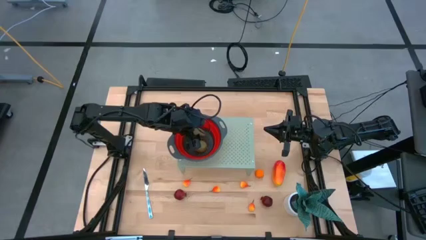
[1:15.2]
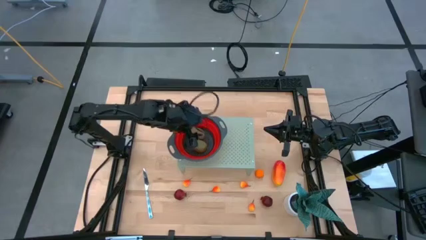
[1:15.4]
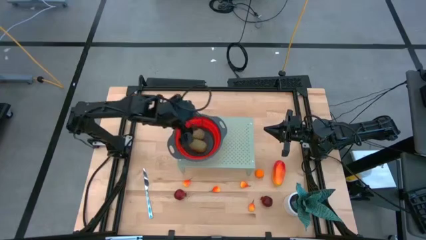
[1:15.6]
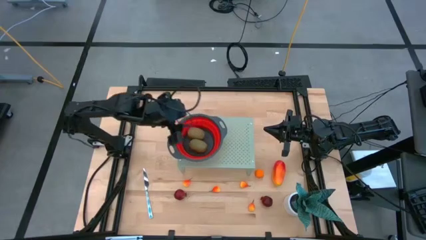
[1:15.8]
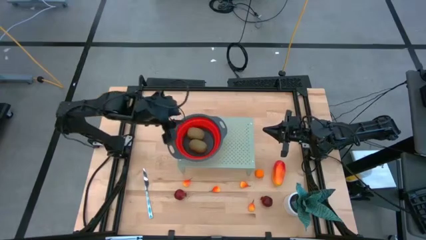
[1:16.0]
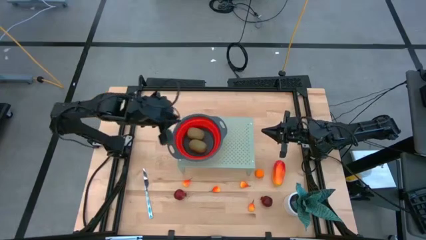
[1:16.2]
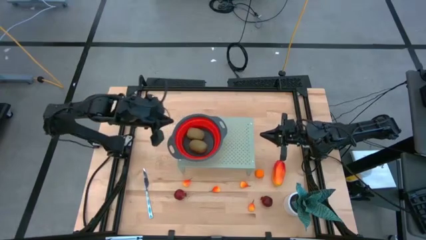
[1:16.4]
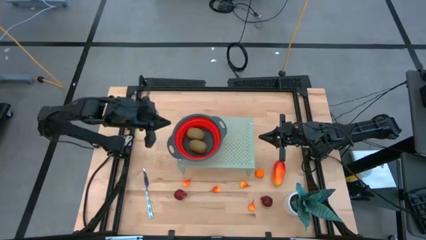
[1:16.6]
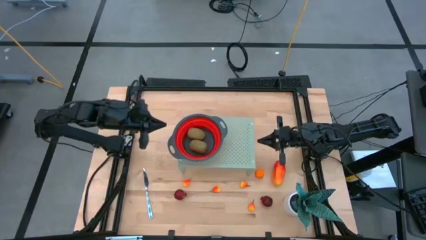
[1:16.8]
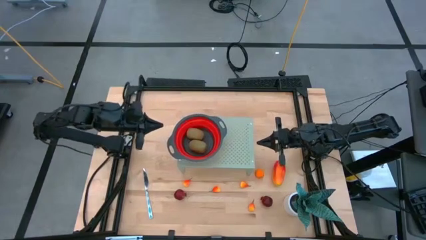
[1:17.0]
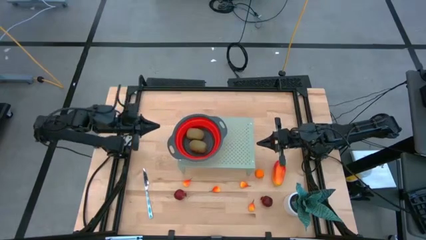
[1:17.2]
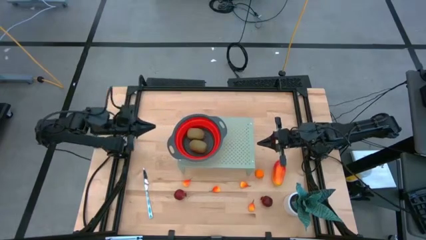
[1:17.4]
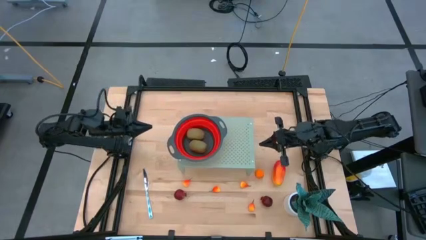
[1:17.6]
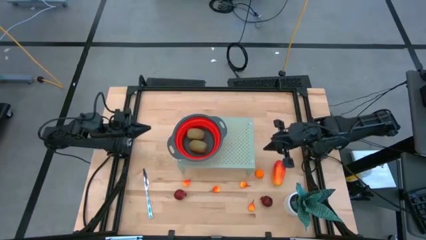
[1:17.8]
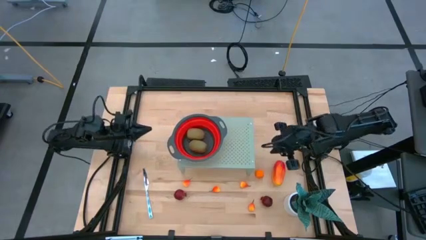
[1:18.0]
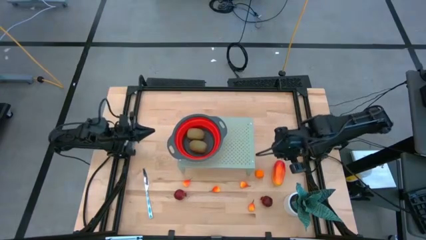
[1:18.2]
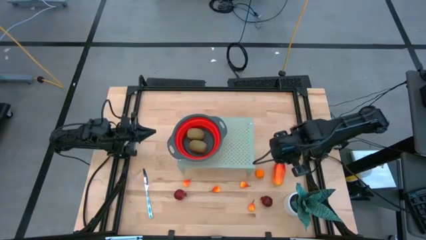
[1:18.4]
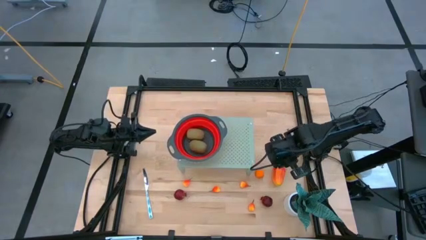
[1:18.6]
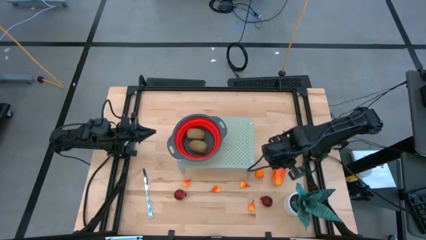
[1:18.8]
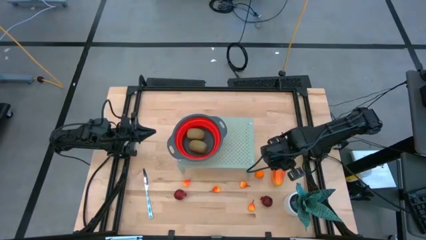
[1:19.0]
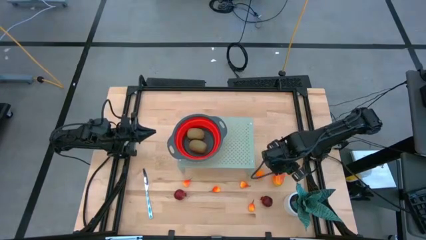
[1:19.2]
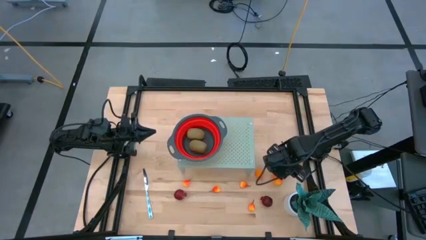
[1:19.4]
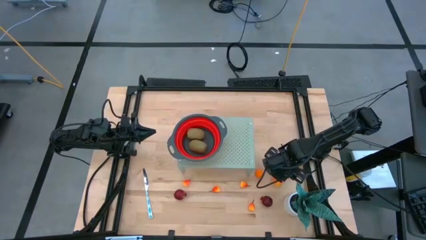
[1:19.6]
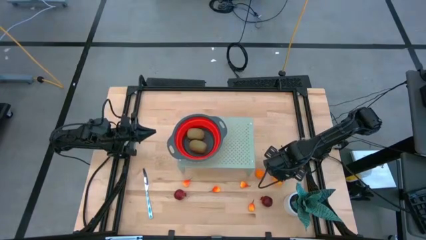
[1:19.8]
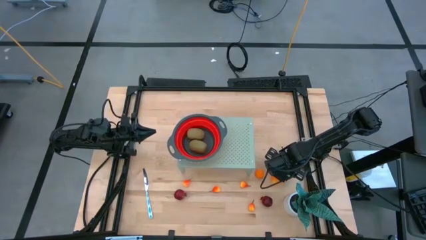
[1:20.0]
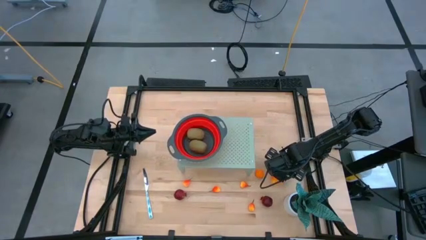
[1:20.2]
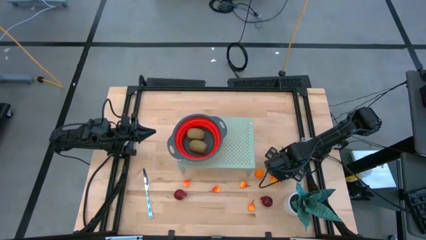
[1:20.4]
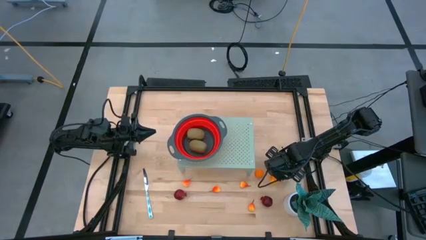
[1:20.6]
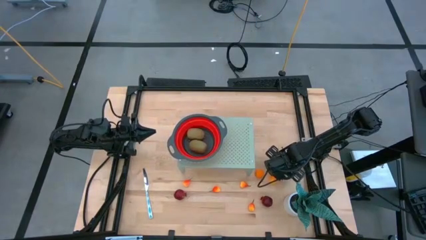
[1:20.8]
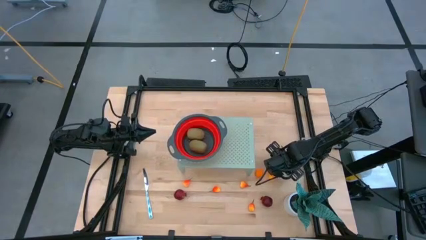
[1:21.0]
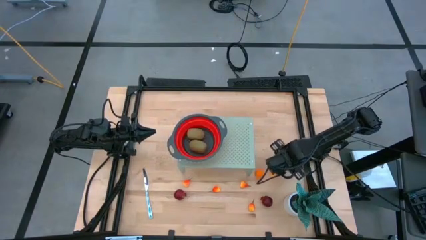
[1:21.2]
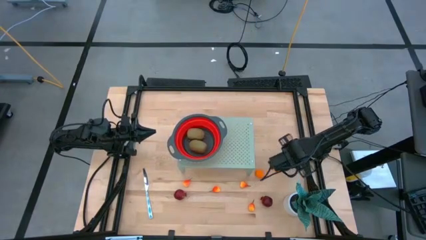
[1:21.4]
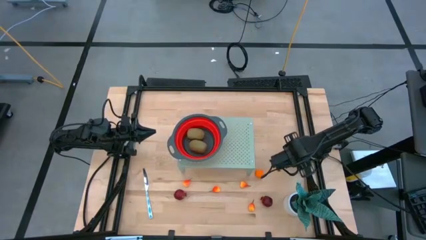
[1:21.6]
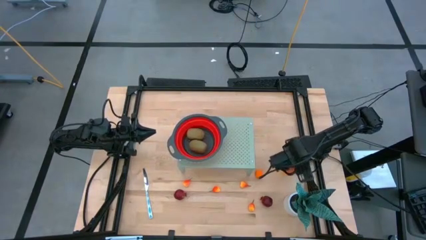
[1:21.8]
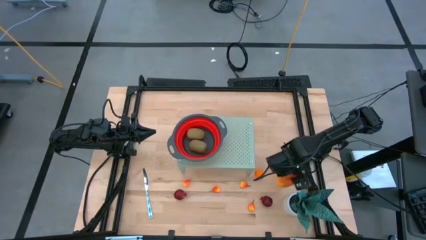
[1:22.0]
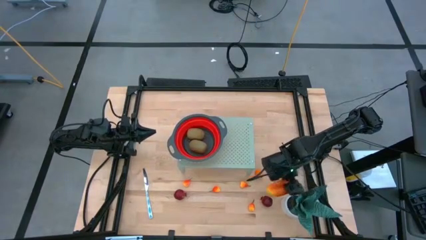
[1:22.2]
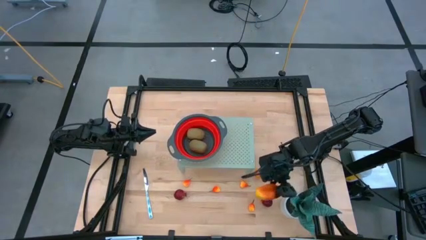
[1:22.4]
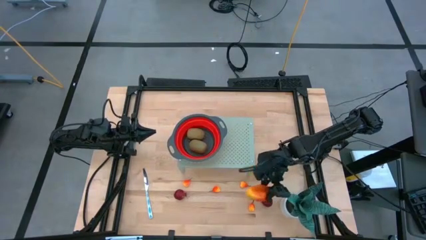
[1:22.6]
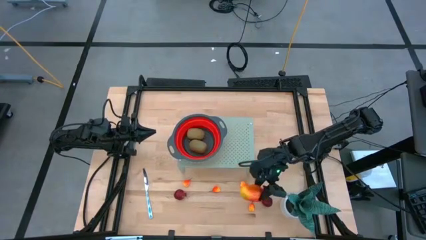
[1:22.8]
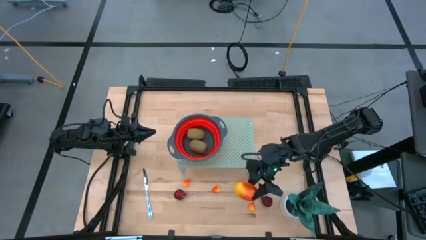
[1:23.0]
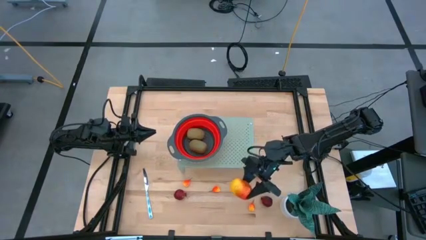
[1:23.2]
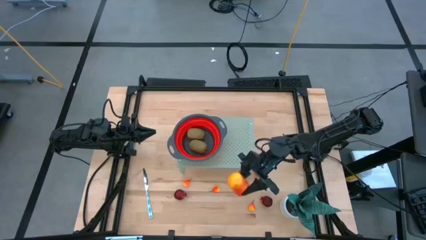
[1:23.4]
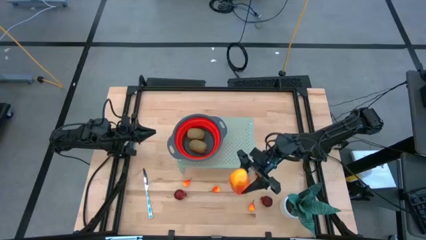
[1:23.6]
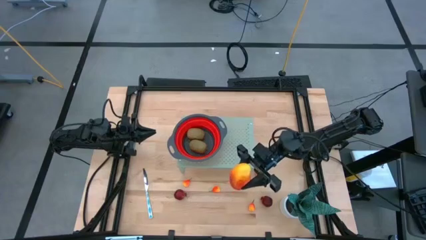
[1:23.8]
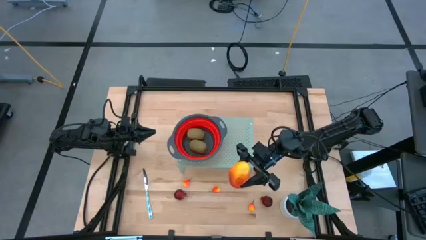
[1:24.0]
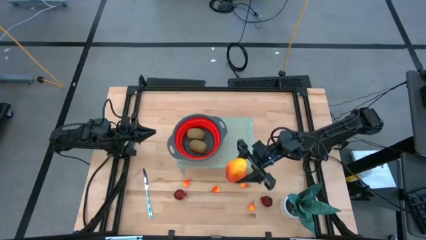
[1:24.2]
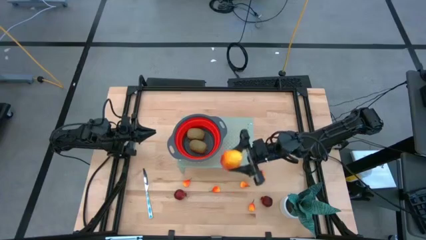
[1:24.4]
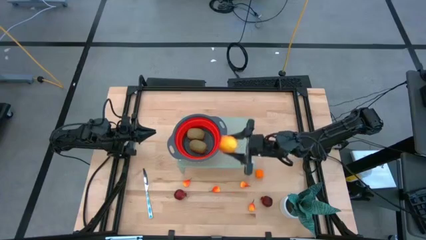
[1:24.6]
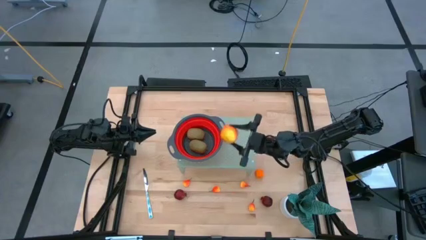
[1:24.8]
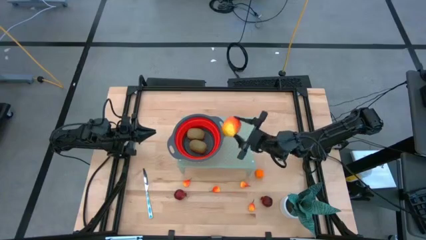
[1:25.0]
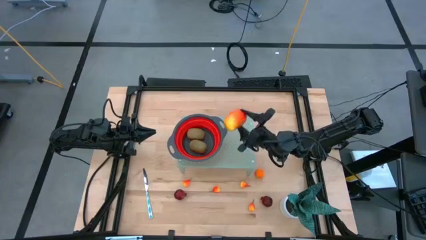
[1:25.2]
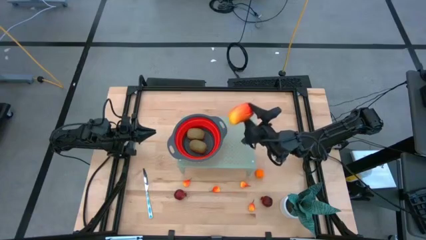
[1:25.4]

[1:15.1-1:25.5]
Task: Pick & Place Fruit
Put the mango fruit into the strainer

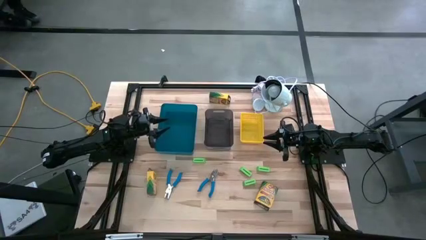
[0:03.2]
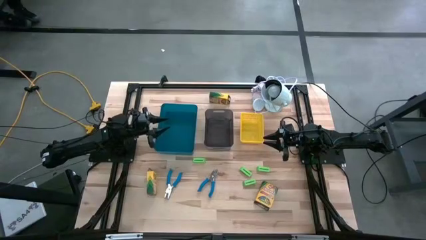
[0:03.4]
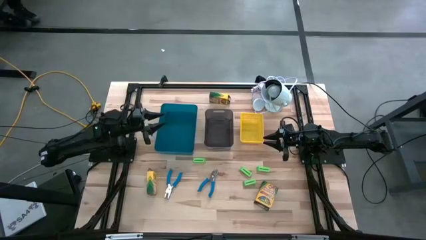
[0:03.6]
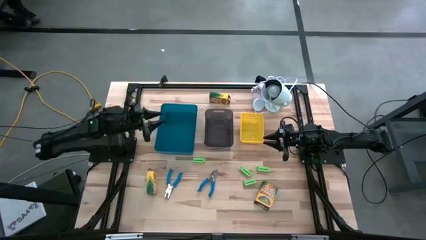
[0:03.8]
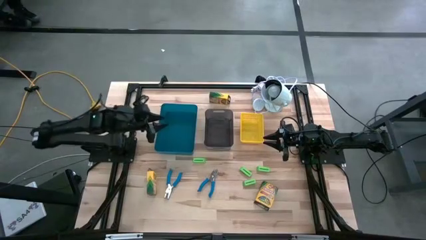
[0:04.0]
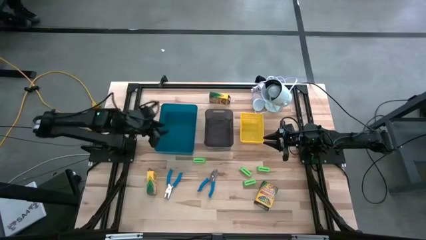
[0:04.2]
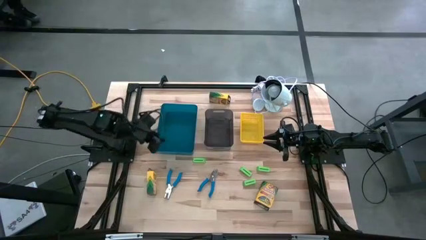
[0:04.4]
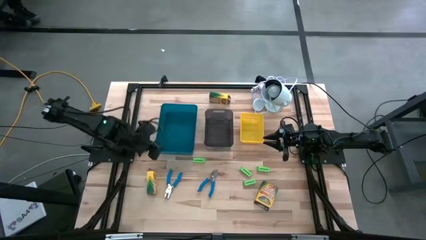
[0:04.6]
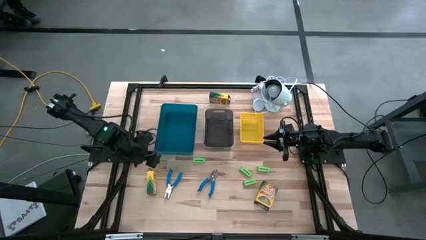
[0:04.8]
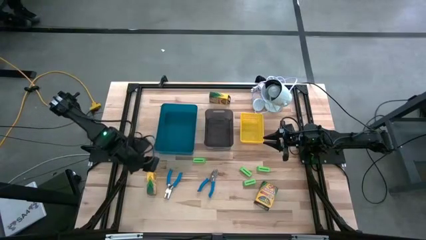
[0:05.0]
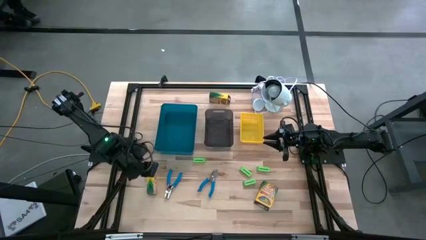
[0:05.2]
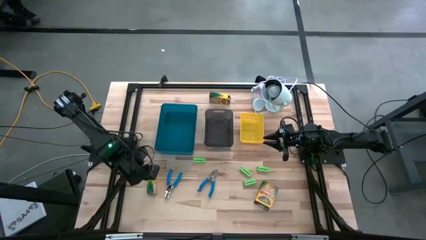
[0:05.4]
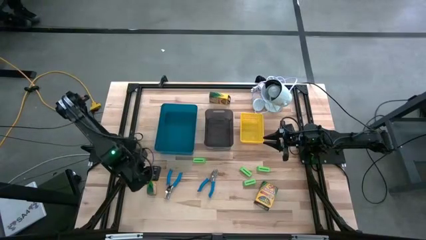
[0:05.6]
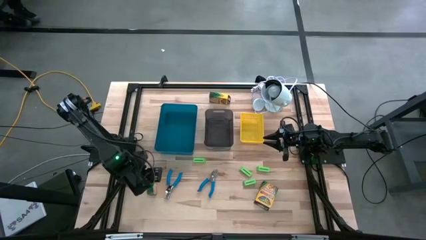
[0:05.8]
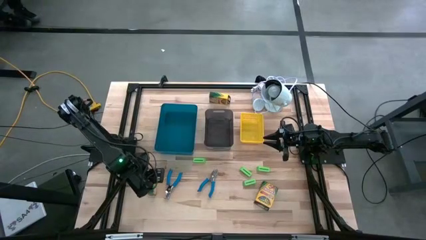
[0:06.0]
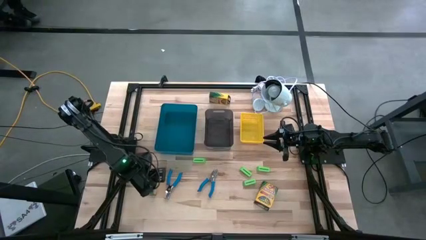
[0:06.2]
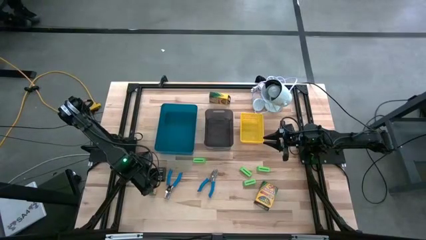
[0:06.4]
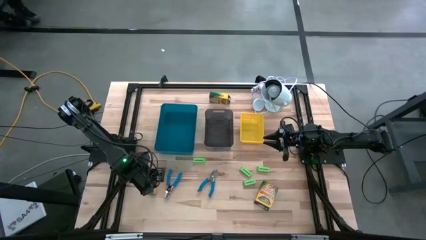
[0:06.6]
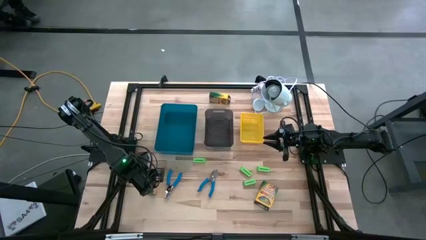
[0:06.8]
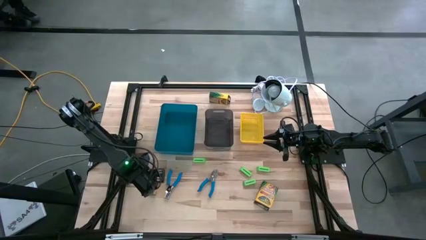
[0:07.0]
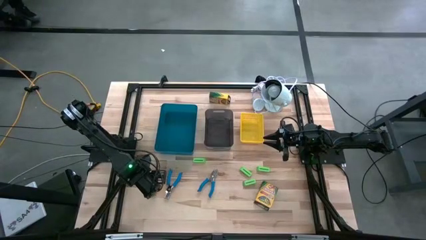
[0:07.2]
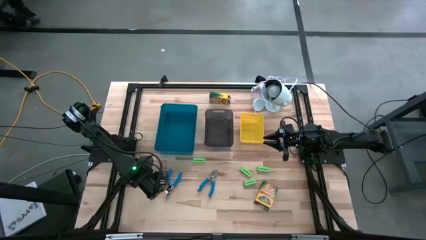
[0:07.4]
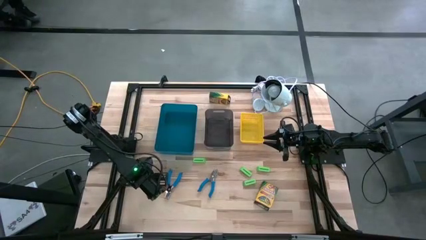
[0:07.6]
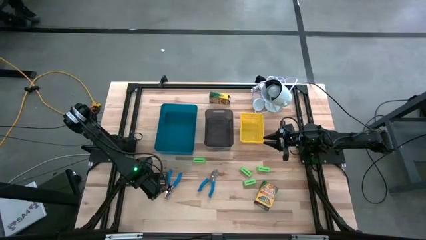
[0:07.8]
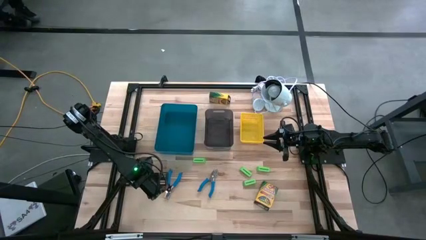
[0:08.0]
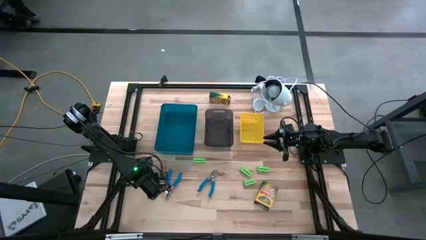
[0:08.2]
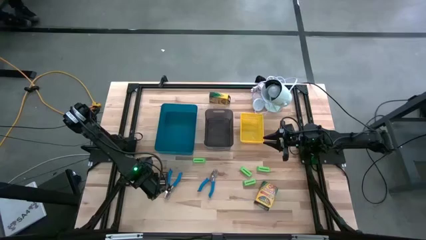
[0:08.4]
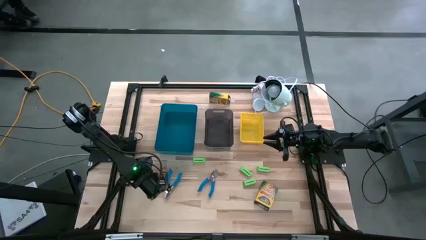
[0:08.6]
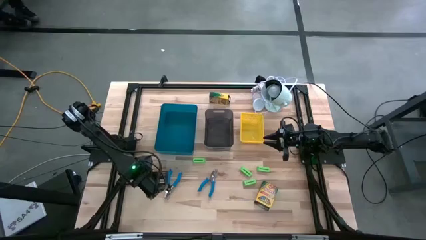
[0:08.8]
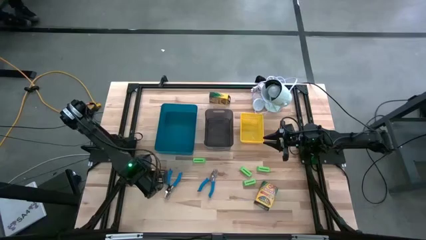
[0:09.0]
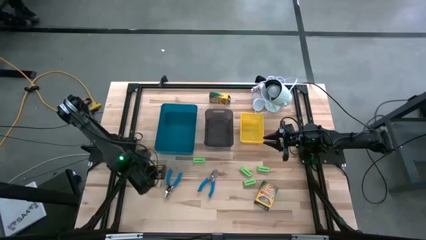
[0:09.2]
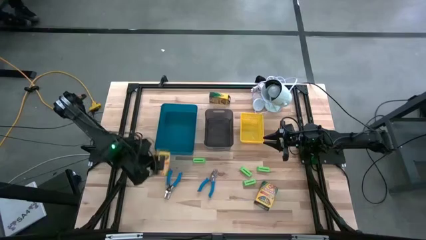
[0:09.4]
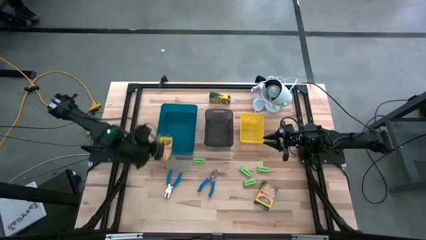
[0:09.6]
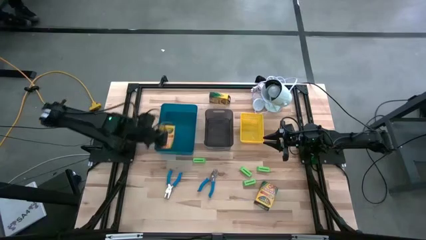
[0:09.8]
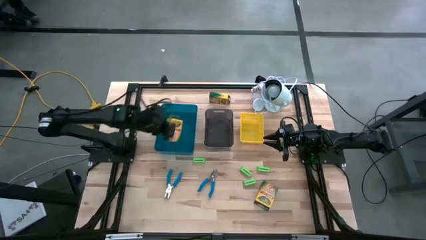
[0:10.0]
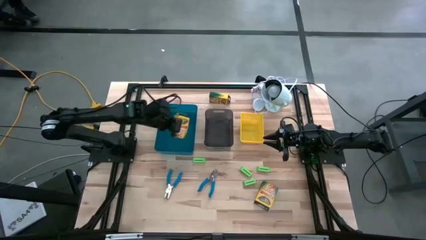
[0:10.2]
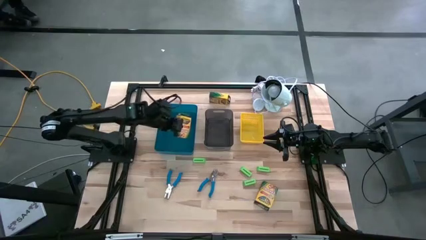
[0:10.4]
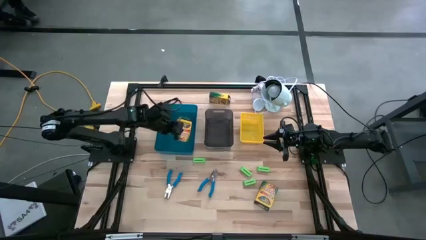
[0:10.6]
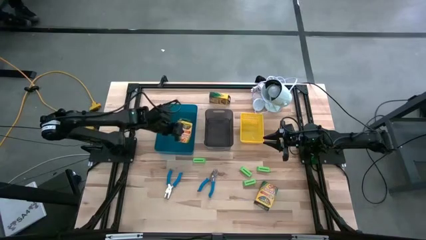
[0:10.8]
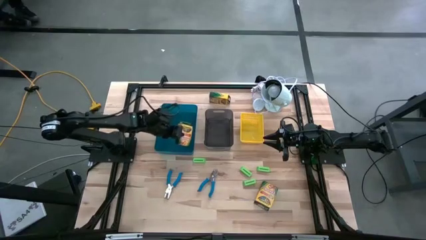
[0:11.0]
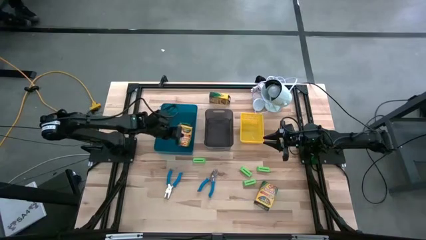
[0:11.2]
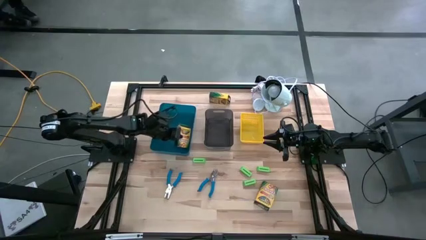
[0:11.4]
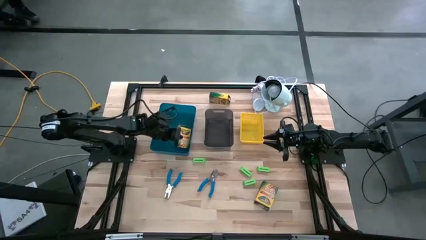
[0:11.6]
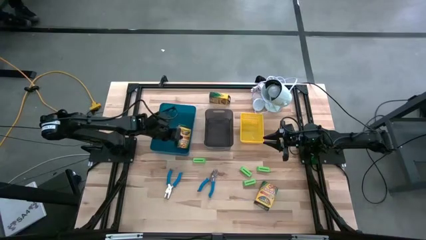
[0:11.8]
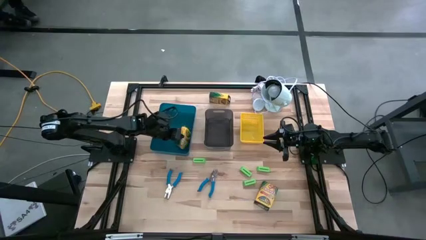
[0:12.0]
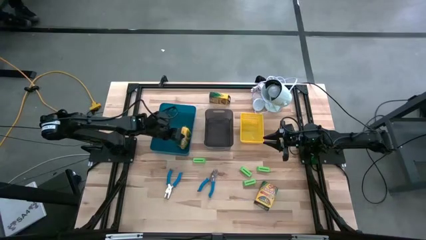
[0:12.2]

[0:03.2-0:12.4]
Task: Pick & Place School Supplies
Put the crayon box into the blue bin
